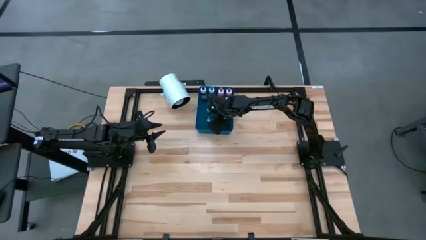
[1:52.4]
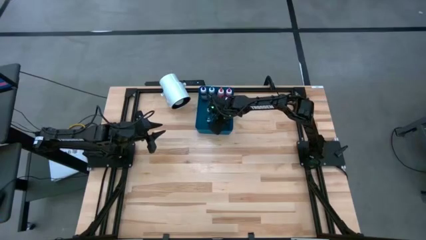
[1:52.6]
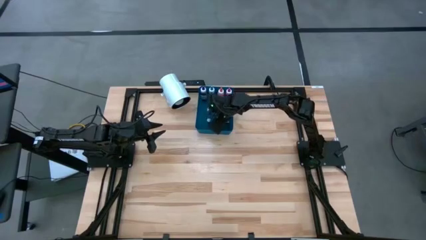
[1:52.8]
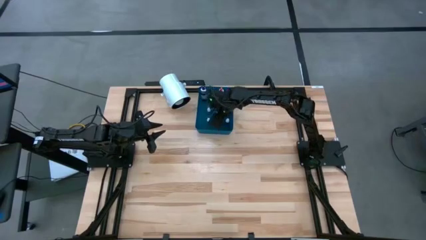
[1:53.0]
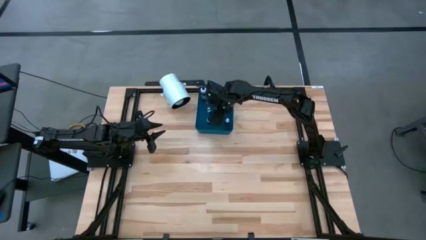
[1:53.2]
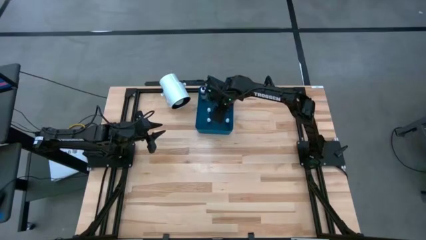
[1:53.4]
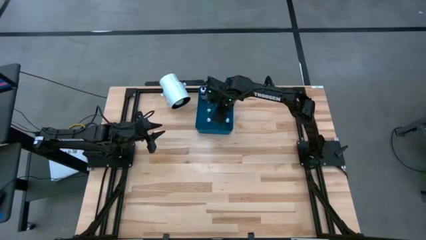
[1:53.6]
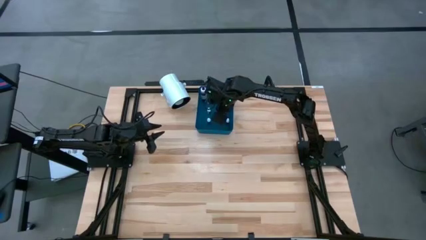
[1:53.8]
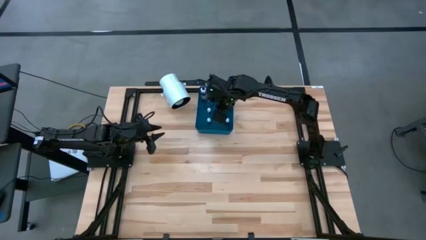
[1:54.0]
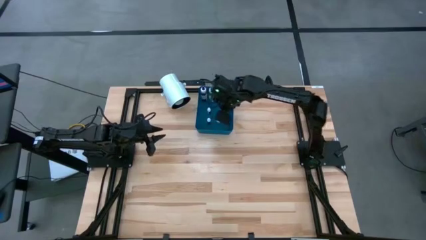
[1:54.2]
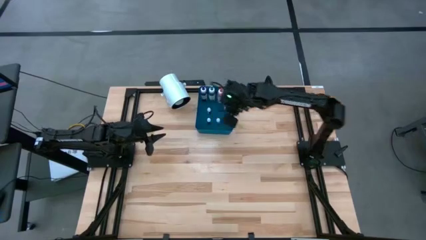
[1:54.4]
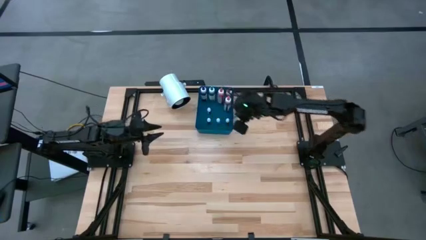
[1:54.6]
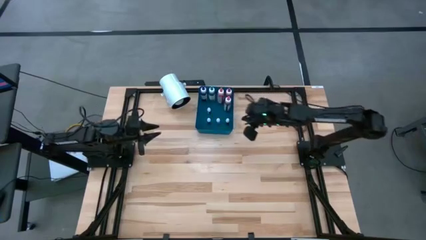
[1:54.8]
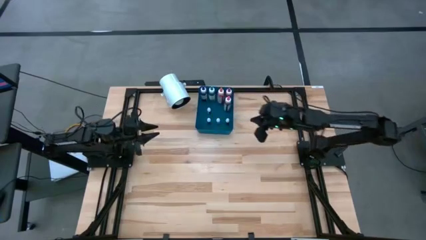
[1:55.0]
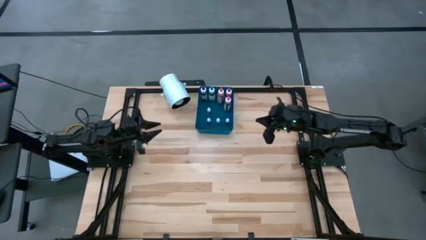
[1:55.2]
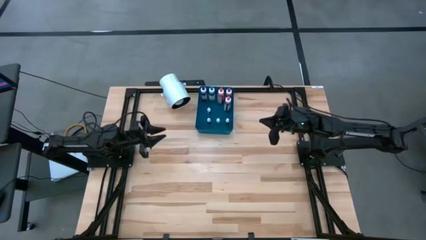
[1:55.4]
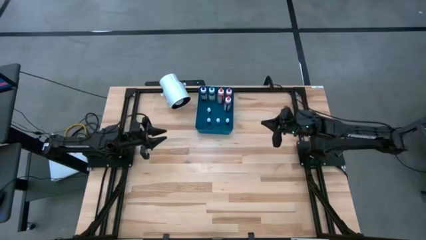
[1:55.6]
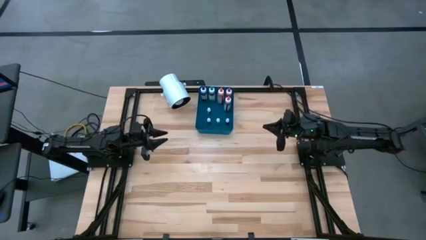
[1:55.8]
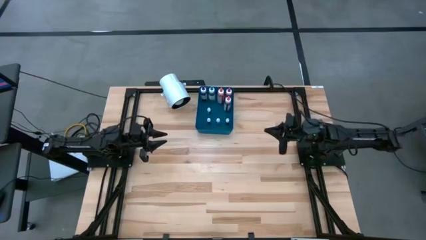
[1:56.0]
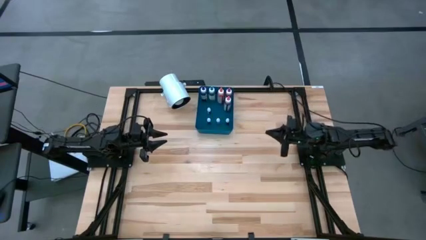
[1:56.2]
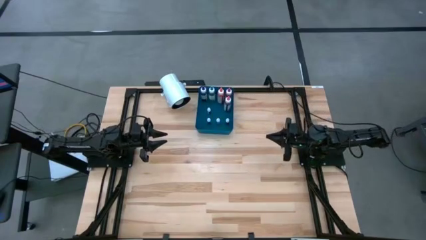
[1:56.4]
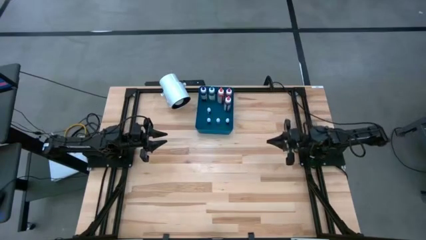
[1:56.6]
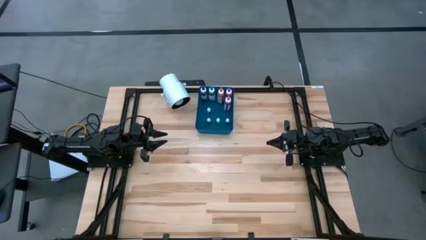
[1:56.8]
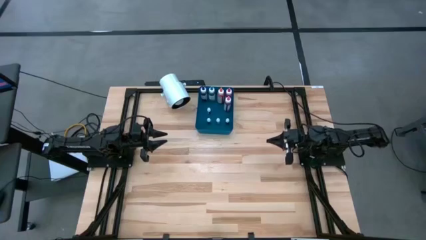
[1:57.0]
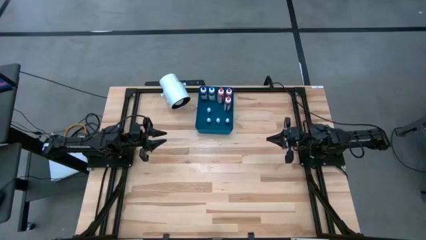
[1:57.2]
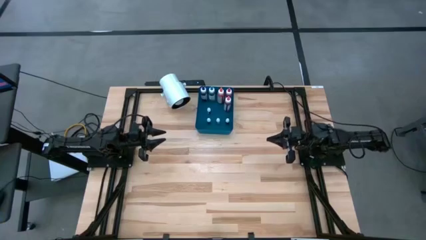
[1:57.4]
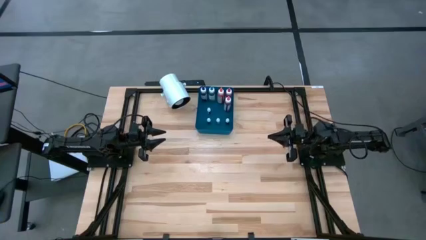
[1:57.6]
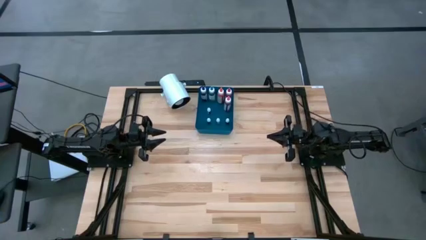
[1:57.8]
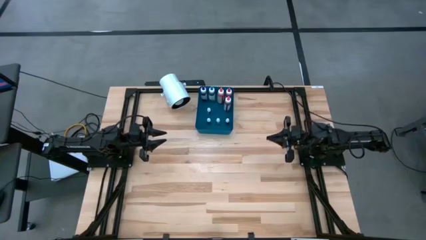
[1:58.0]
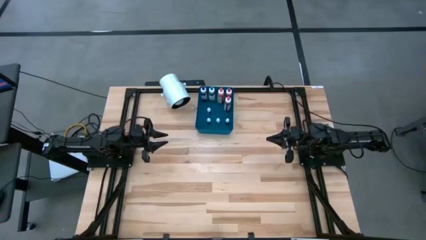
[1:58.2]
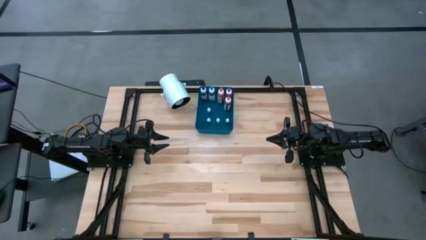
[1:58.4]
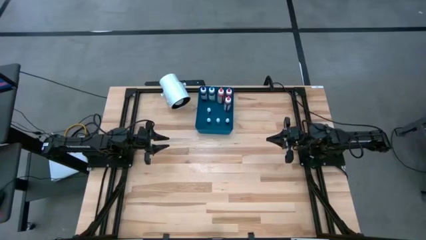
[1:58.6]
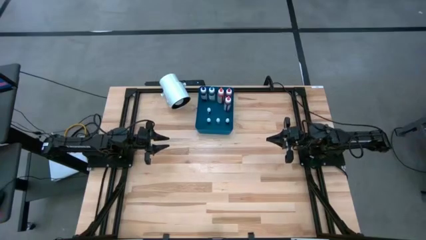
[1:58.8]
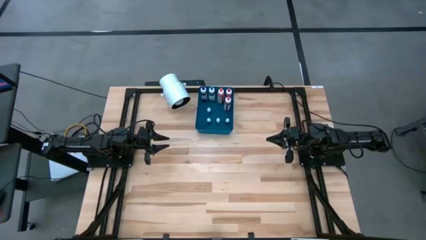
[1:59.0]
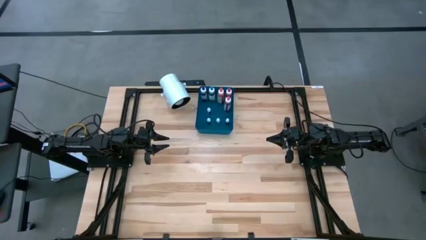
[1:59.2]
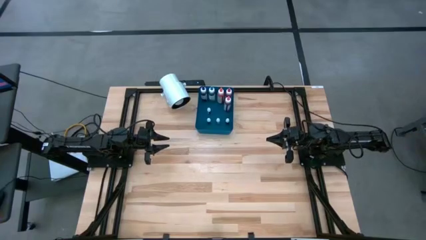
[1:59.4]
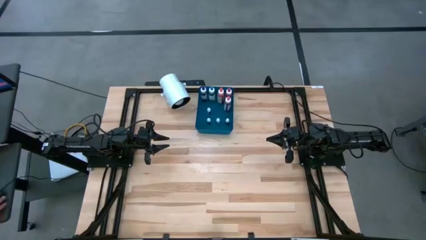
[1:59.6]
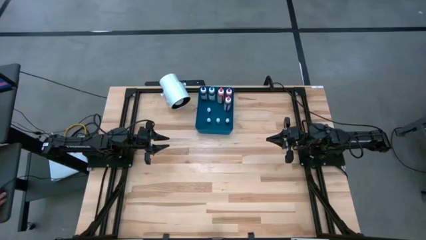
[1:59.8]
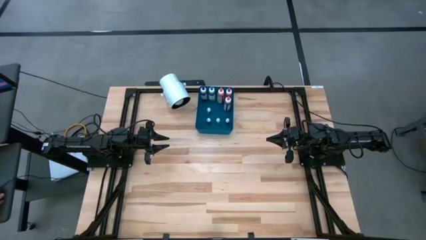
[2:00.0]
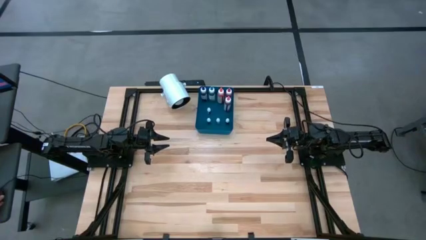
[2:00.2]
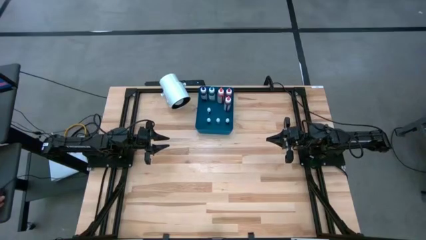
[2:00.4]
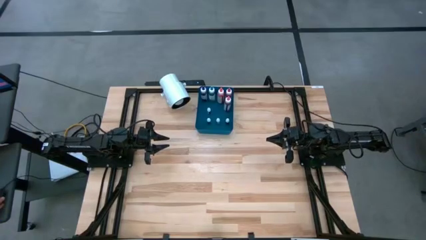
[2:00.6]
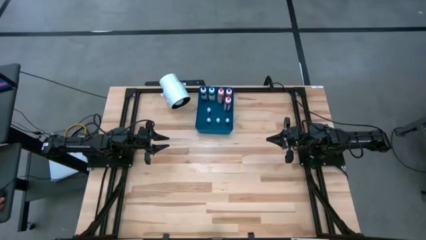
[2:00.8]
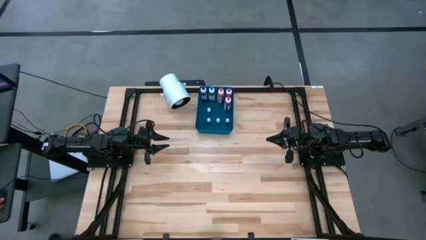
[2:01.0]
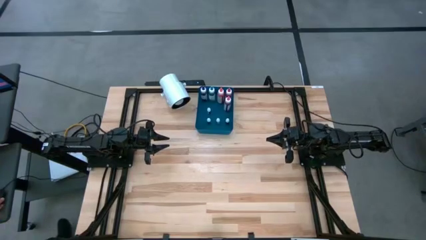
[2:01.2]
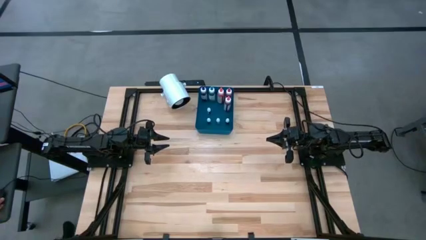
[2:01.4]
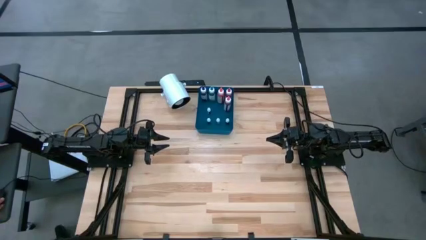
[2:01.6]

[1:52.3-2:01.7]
Task: Pick & Place food coloring
Return to Home Position

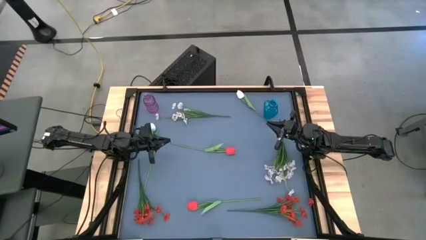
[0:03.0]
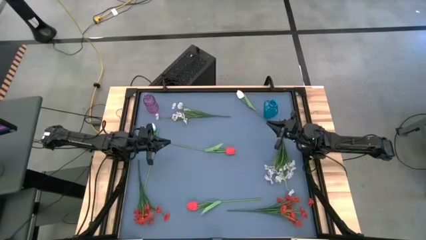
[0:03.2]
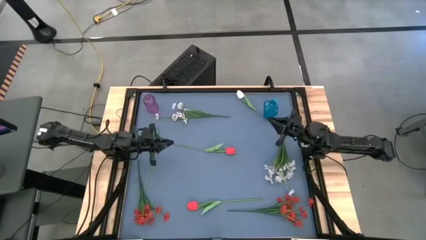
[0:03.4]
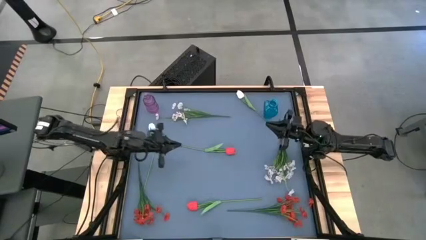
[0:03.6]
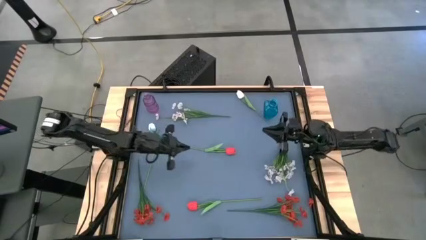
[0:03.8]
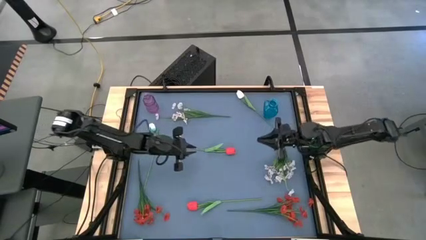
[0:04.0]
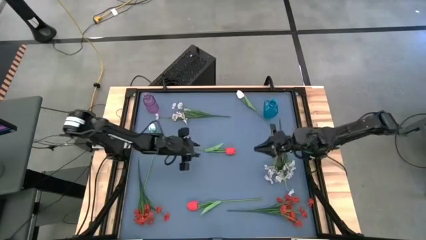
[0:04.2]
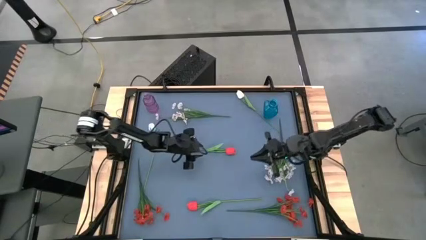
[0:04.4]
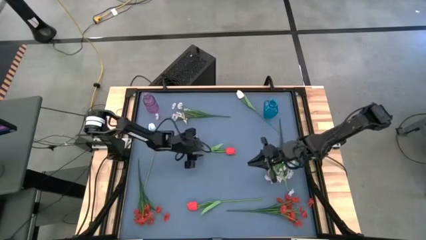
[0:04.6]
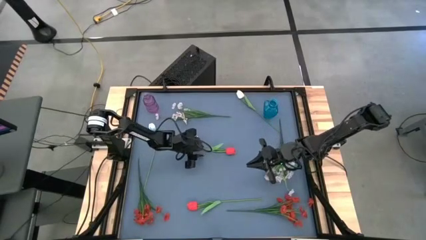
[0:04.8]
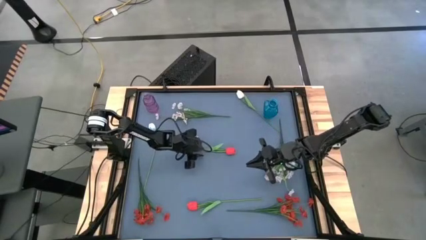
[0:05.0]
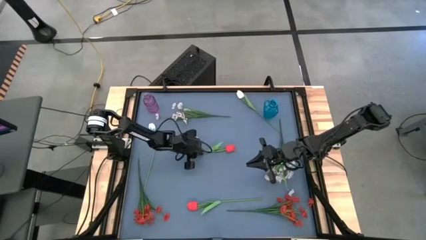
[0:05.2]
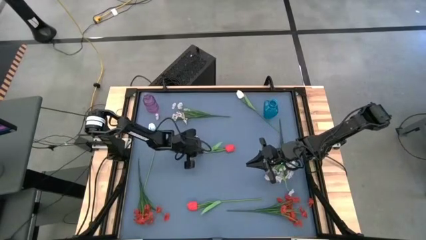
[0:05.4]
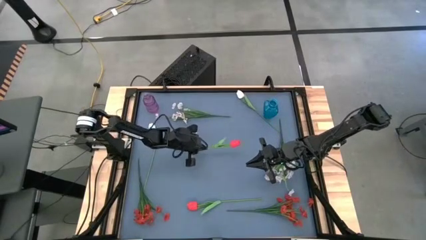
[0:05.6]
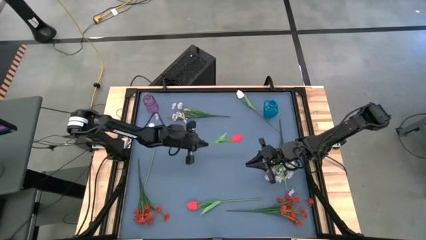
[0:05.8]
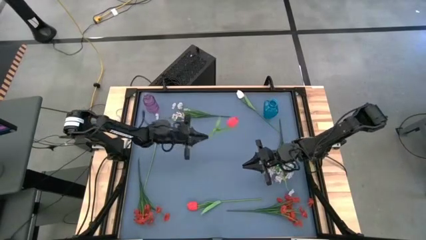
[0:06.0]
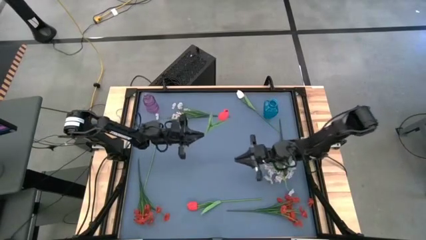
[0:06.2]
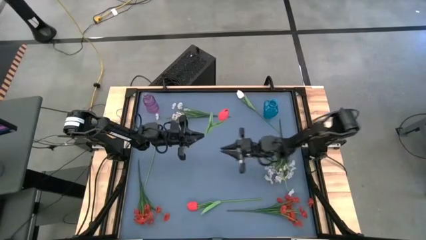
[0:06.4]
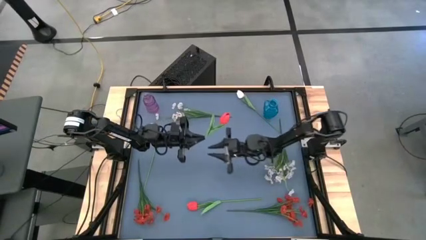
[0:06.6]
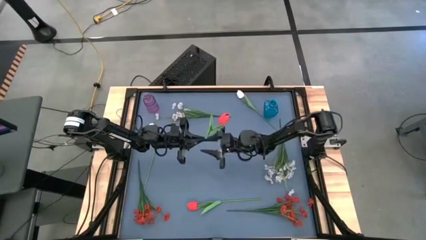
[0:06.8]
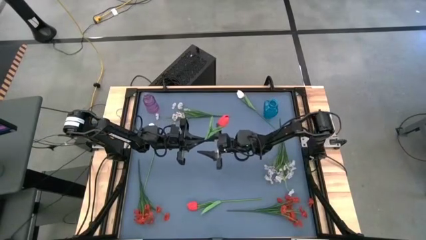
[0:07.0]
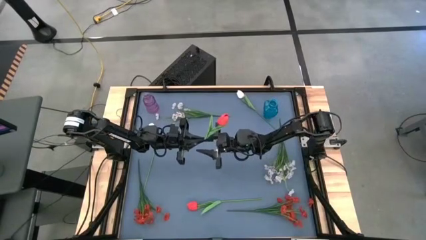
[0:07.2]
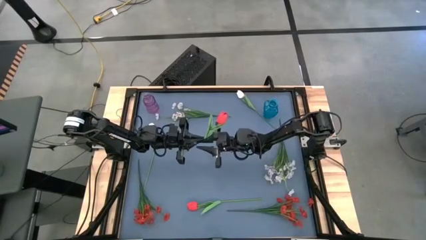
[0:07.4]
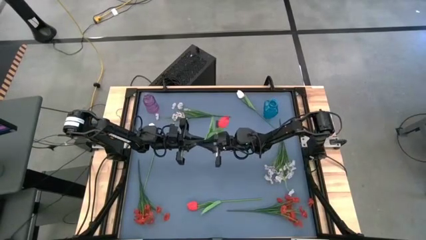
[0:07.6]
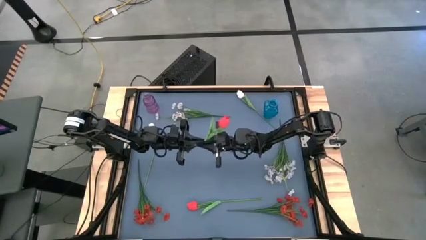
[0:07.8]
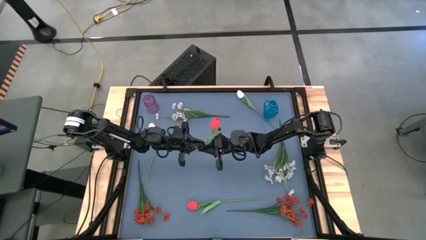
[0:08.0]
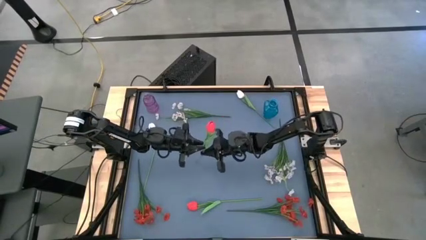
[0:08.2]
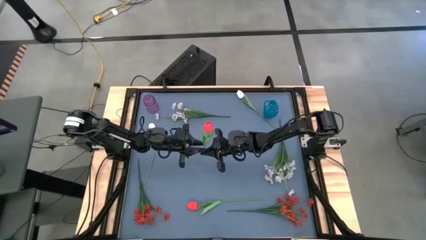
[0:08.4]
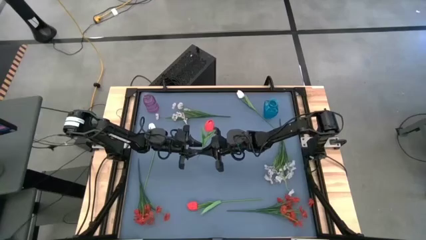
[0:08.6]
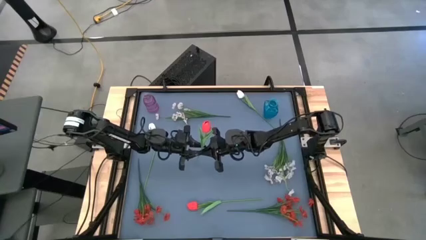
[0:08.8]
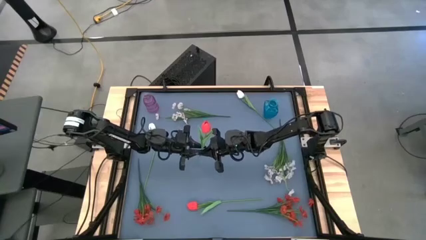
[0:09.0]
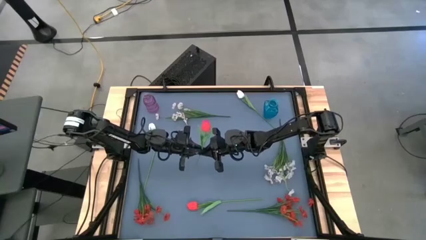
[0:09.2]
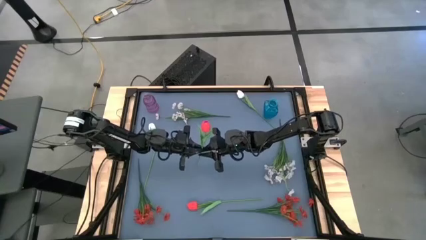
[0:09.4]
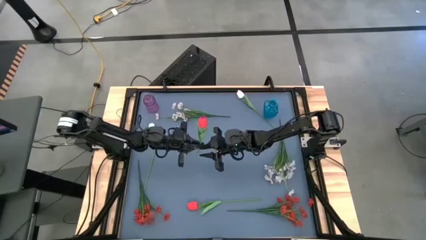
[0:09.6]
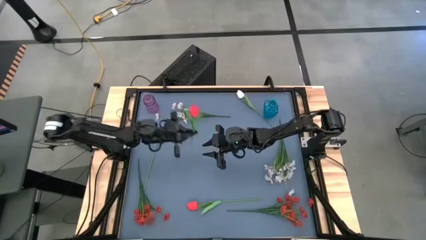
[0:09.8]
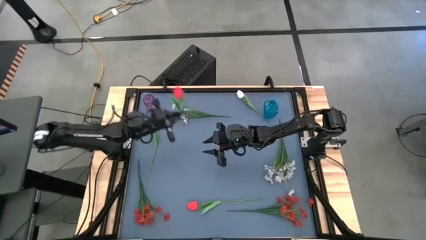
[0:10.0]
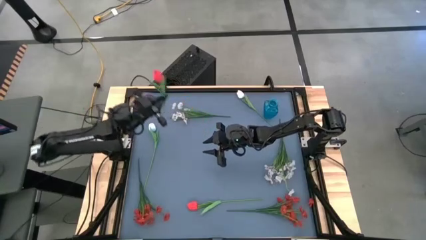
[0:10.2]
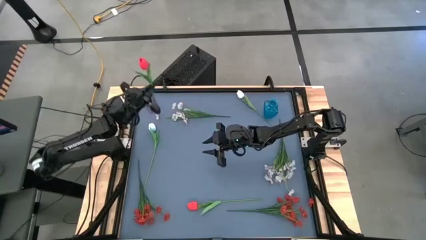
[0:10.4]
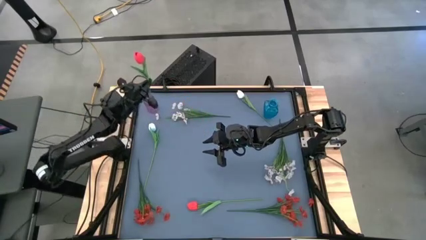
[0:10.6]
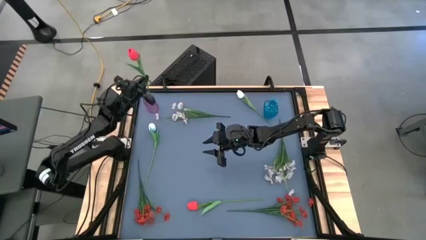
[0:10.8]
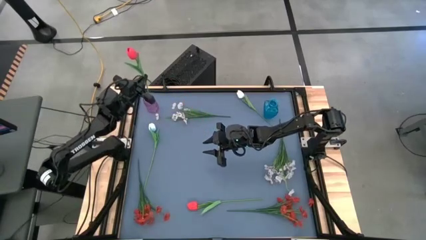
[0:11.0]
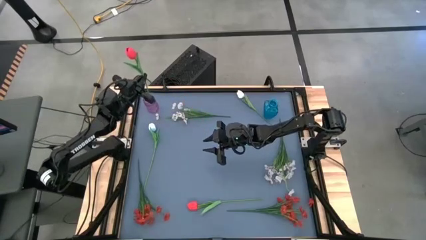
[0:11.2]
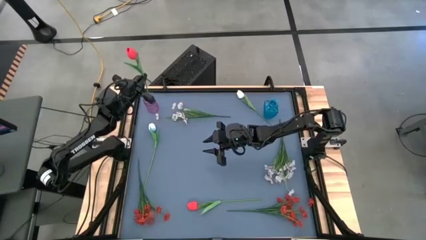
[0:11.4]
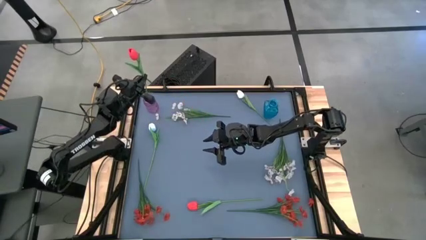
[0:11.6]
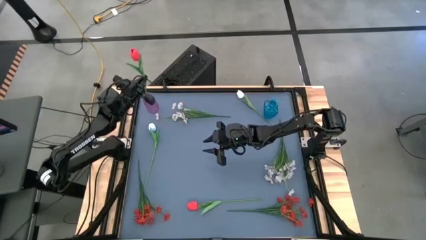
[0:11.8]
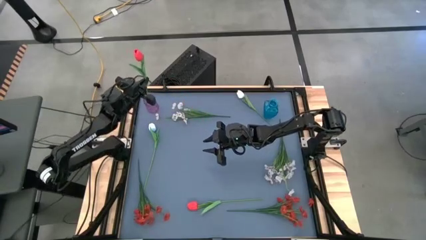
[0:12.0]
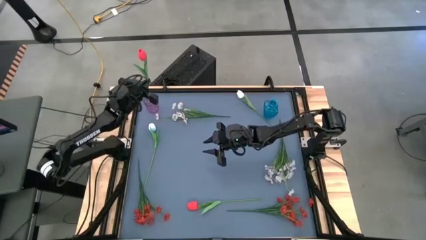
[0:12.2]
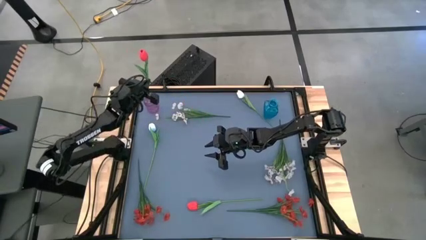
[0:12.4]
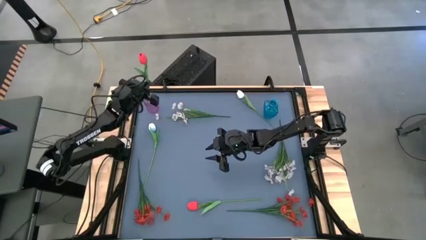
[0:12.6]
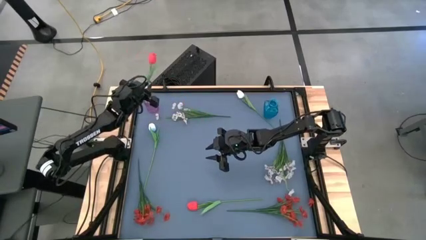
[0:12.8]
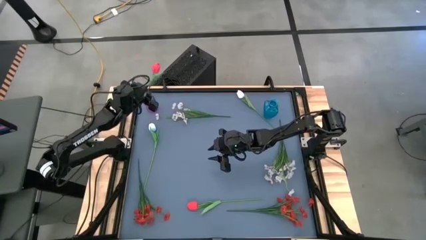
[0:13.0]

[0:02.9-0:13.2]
Task: Sort flowers into vase by color
Put the top red flower into the violet vase
